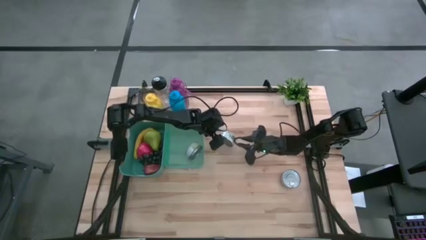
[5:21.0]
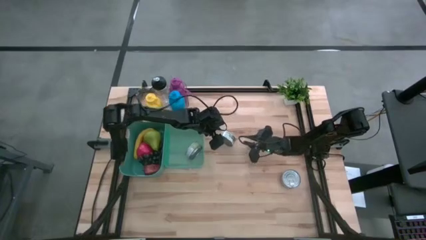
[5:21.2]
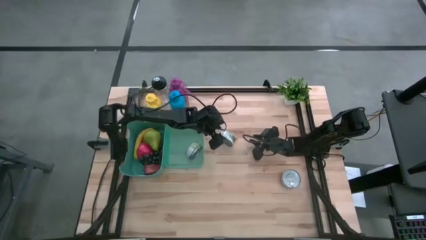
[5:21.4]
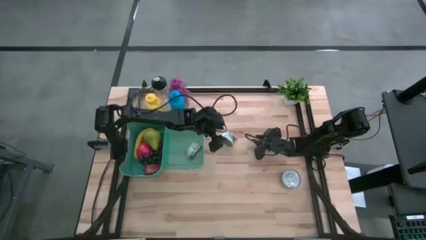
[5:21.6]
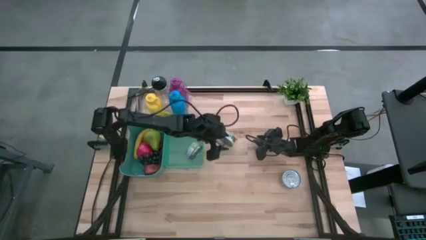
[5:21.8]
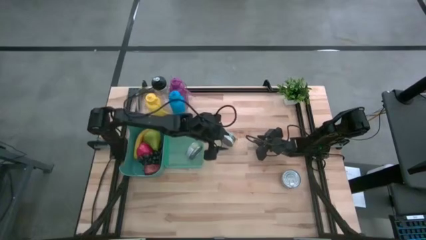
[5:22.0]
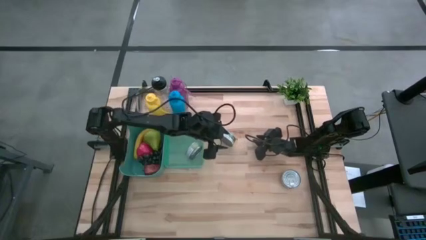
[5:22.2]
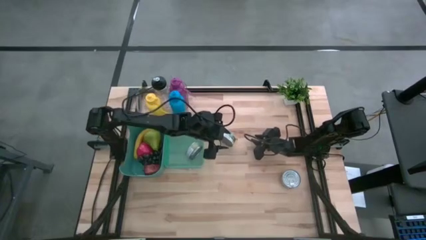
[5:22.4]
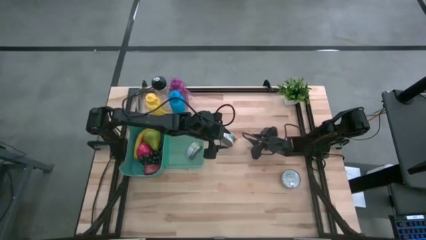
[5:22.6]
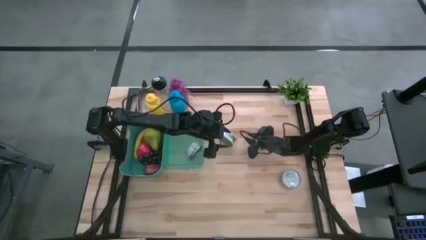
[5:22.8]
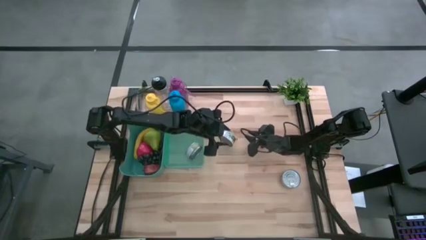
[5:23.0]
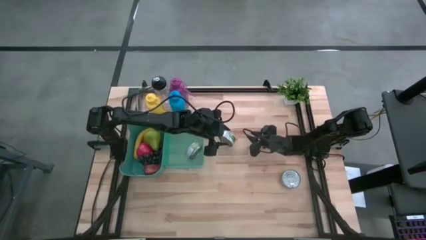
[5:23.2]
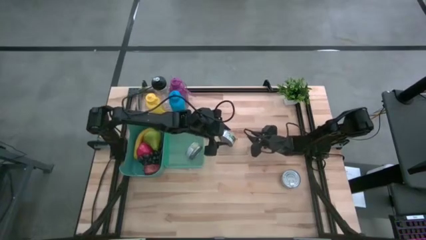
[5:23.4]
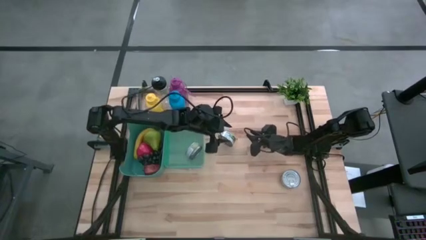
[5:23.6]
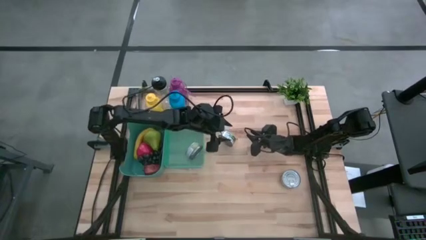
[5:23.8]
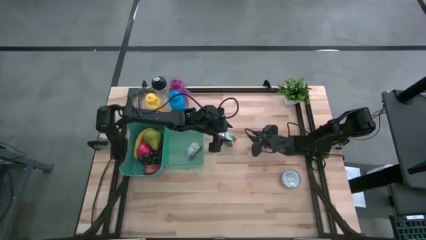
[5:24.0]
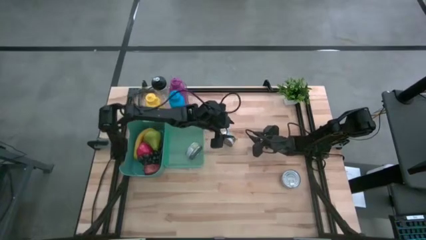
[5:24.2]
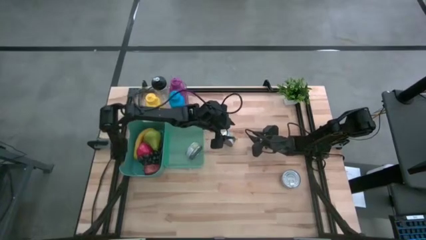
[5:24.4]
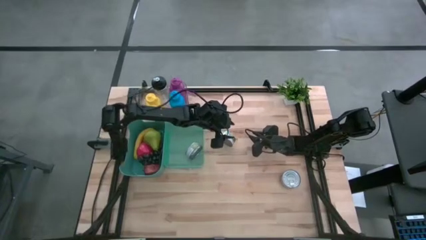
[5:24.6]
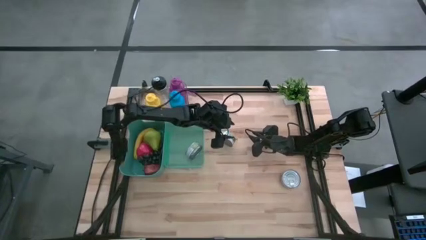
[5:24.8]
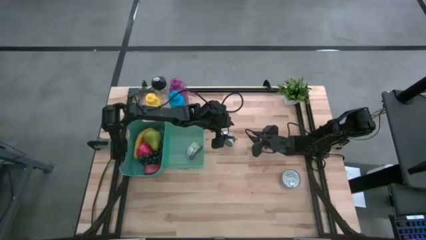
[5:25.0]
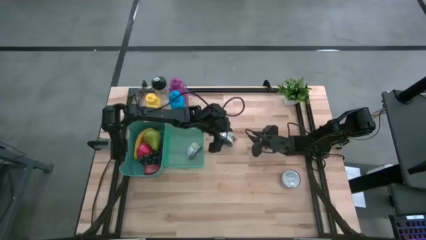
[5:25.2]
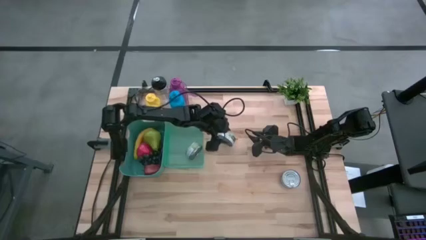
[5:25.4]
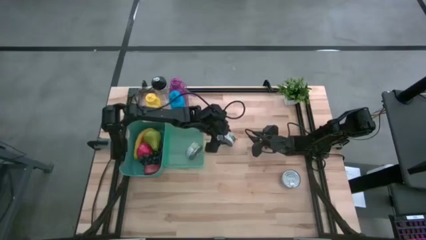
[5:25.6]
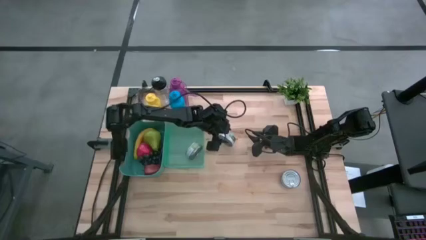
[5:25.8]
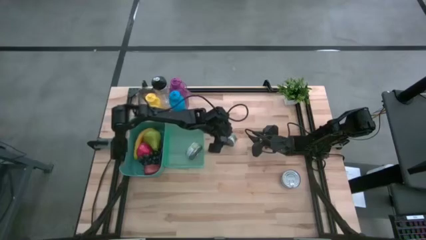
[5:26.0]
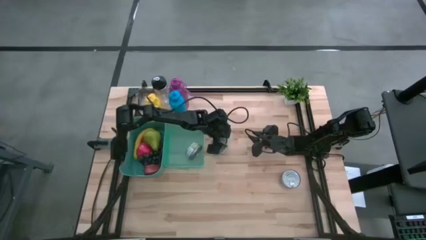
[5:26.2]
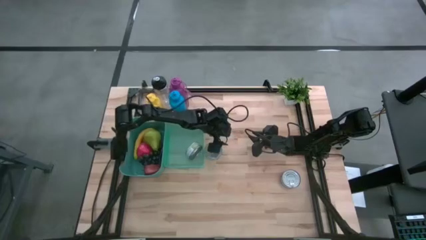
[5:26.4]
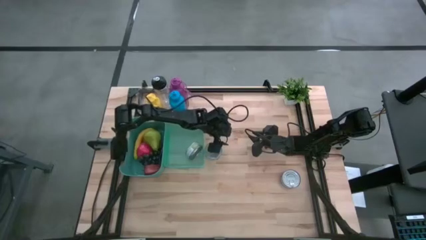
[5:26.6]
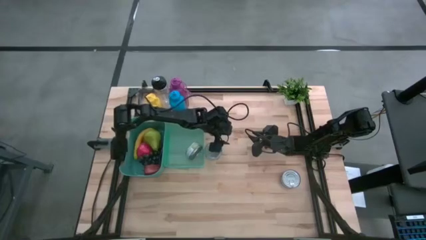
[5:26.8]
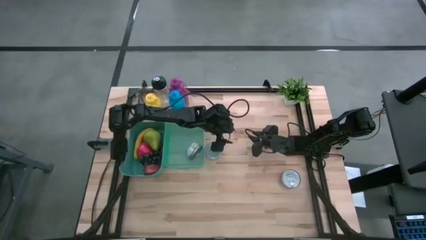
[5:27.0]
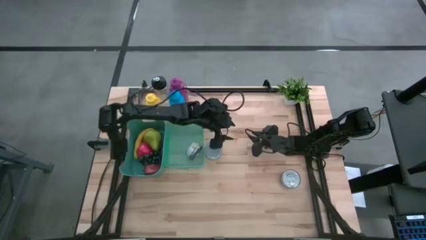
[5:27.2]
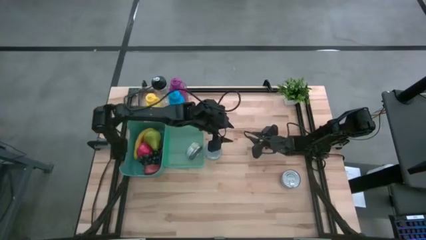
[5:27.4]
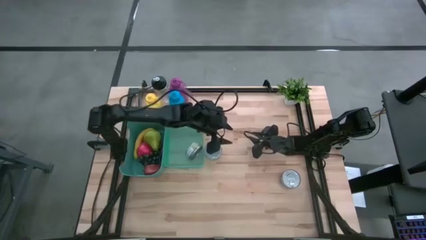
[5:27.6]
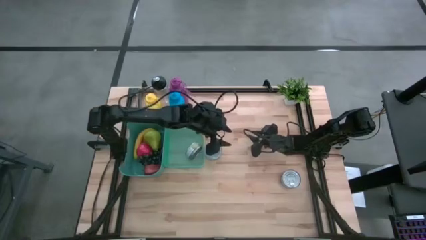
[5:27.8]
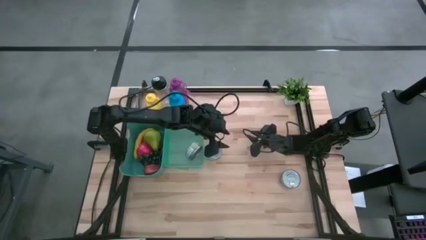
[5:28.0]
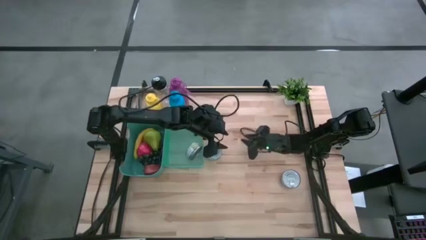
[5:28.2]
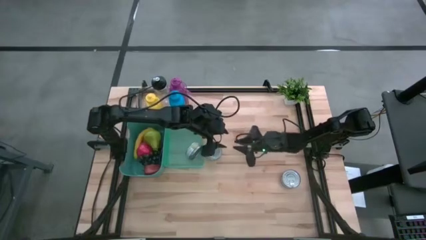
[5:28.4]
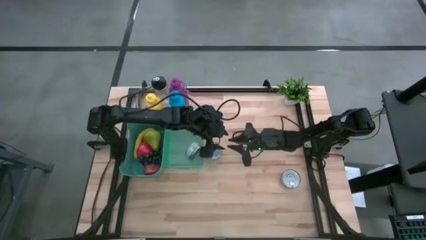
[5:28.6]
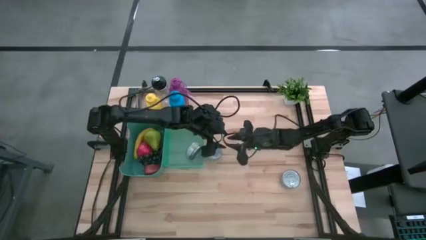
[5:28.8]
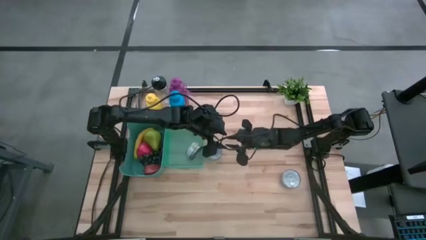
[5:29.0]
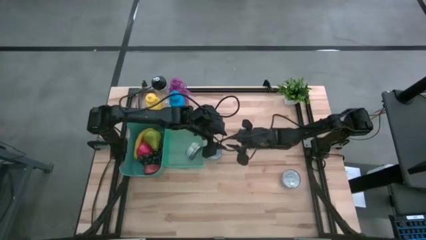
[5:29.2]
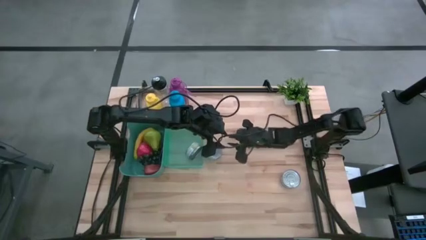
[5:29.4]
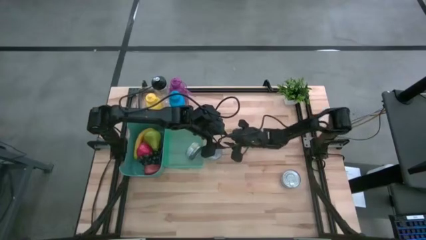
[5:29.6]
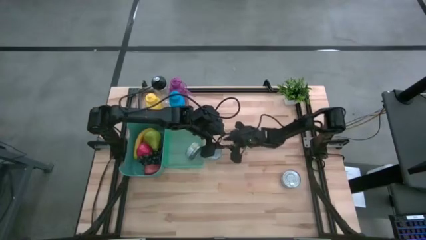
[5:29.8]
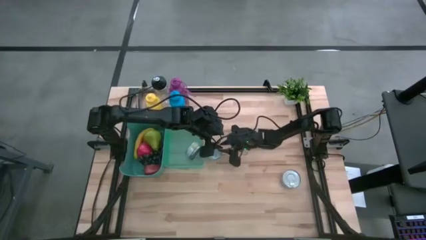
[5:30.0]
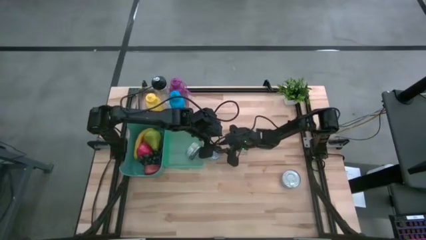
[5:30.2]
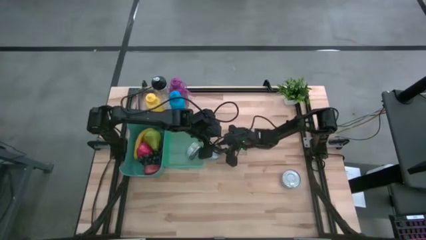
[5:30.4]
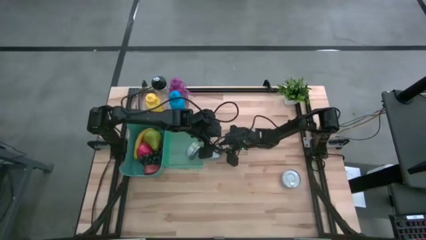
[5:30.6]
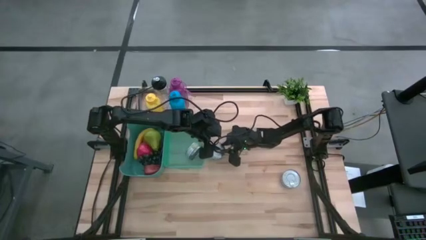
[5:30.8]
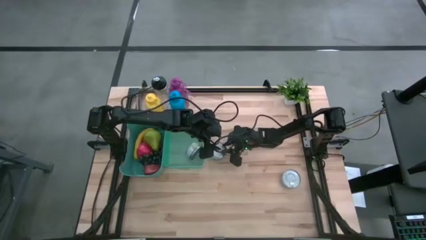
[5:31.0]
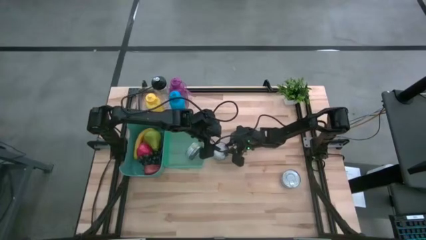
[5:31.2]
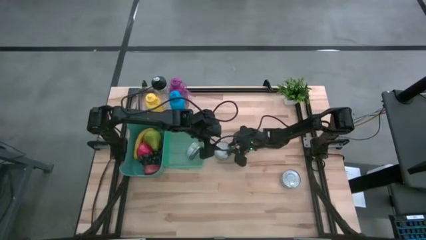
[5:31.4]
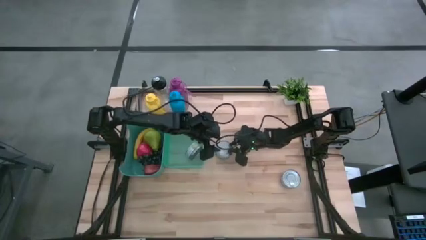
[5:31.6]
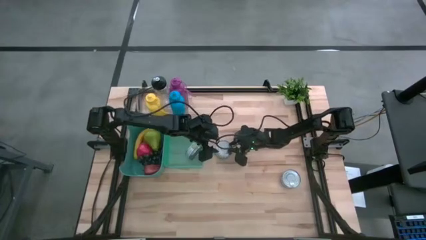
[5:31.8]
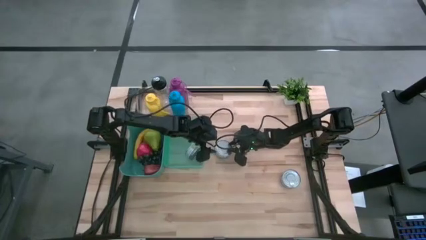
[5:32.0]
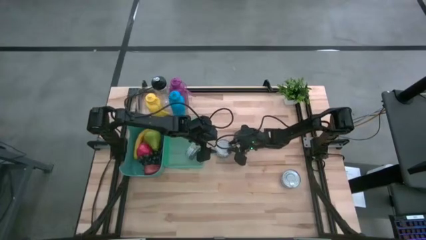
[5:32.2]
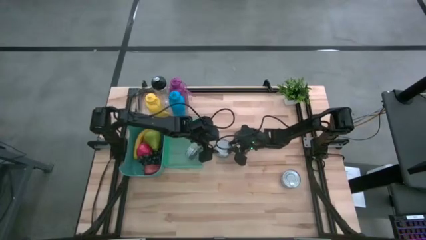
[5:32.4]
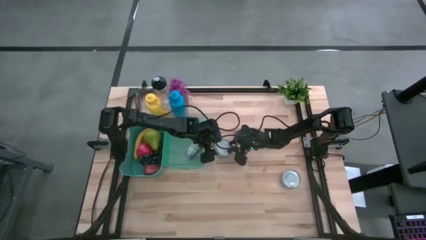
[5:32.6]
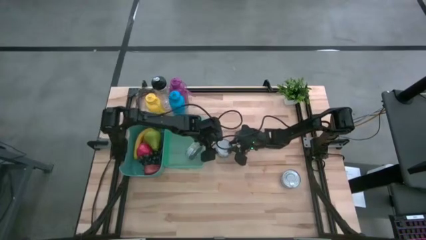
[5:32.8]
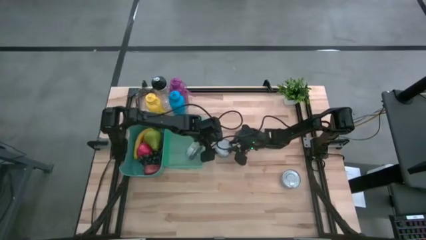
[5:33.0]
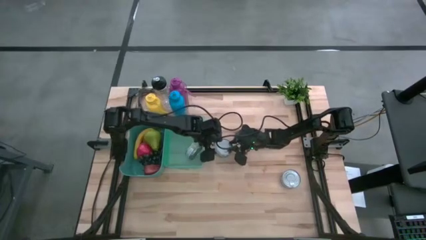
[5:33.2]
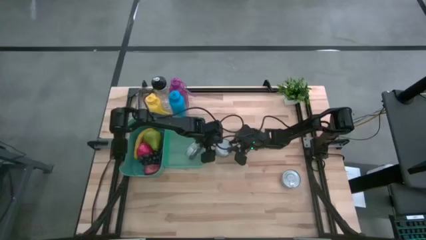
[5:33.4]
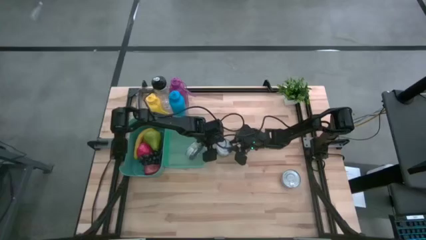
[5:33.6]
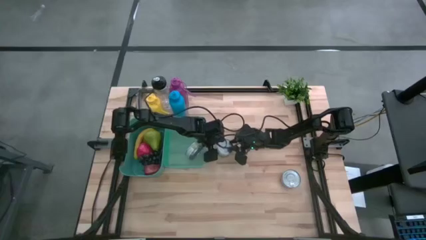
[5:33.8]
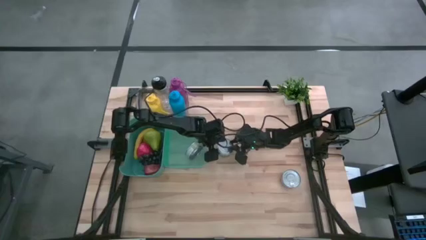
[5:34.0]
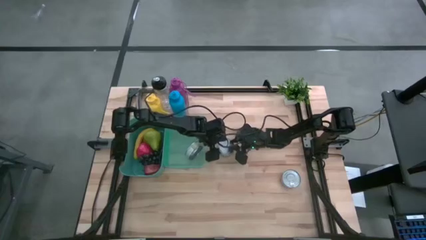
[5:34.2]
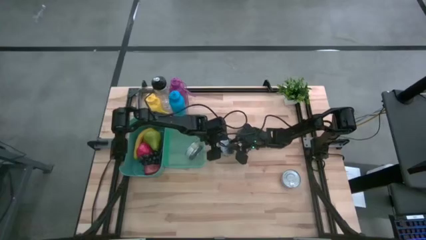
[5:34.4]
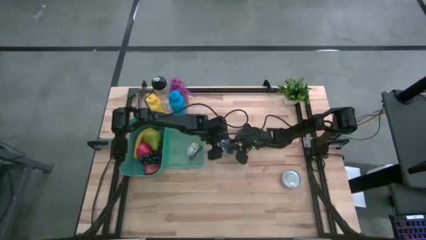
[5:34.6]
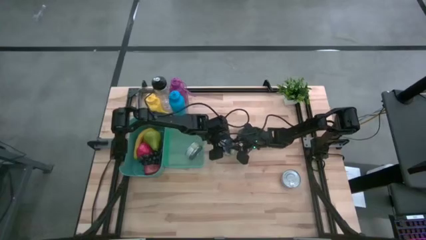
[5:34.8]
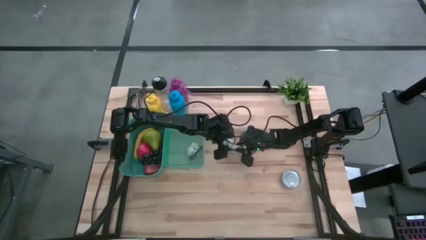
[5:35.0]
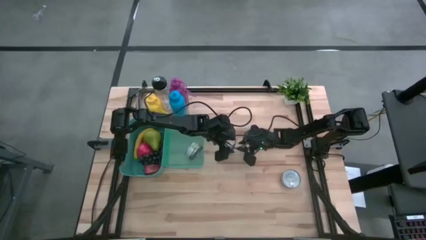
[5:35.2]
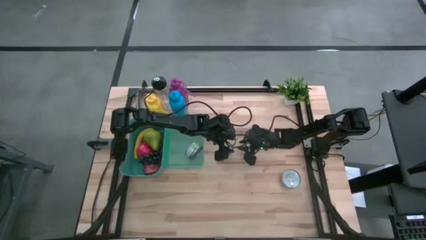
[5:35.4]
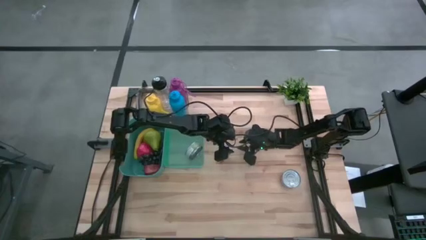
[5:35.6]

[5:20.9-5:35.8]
Task: Pick & Place Food Item
Put the green tuna can into the light green bin
